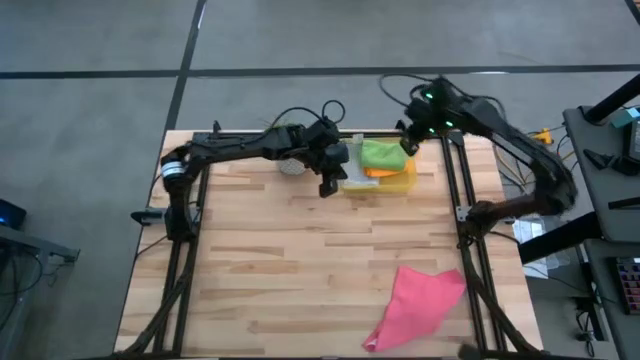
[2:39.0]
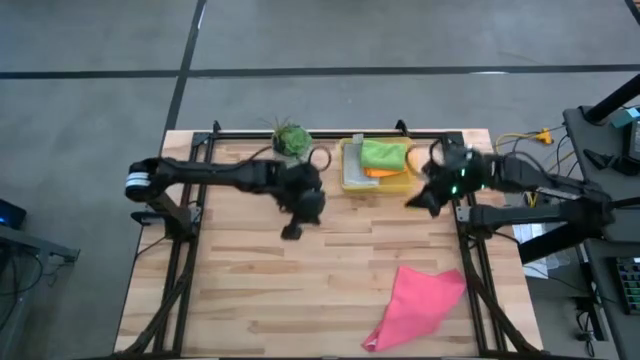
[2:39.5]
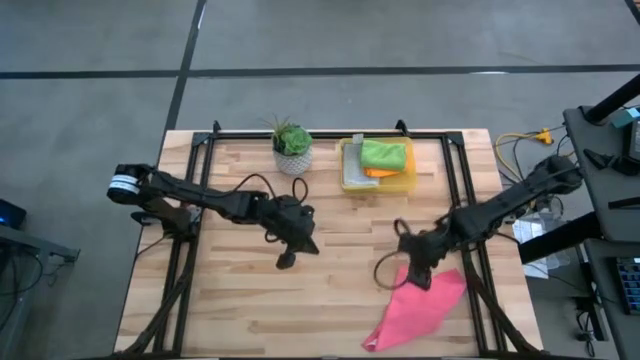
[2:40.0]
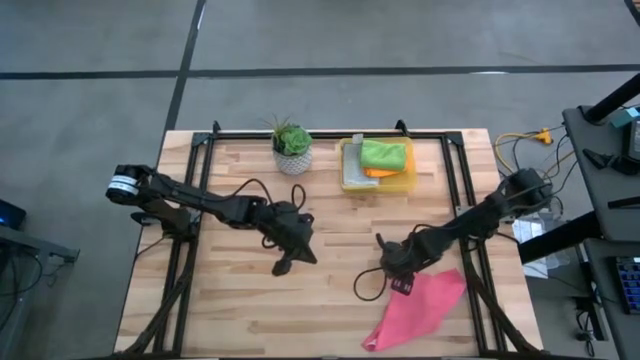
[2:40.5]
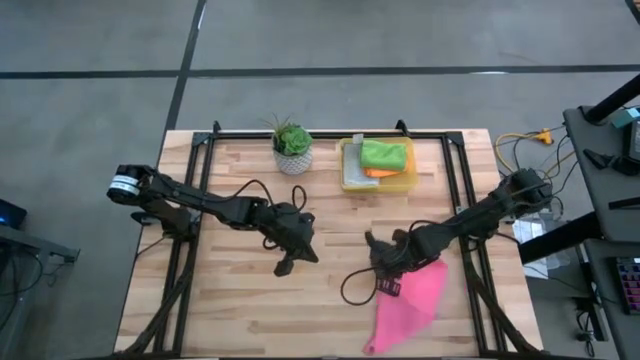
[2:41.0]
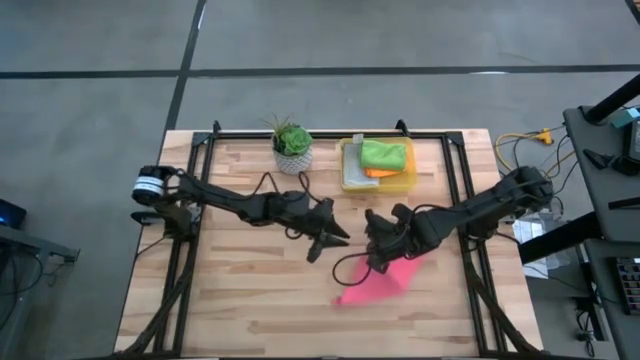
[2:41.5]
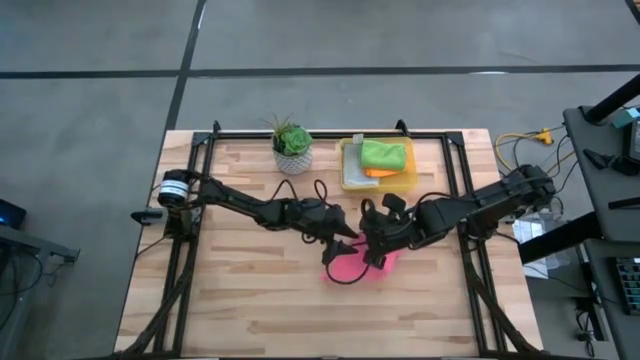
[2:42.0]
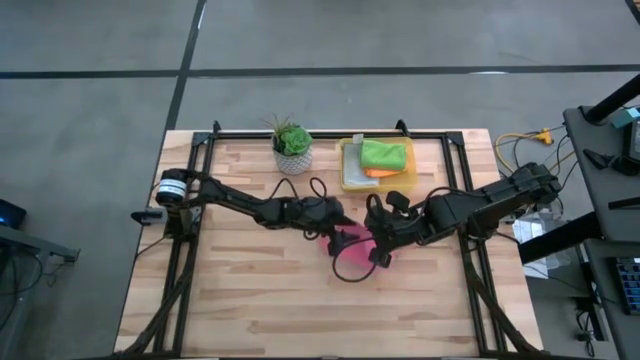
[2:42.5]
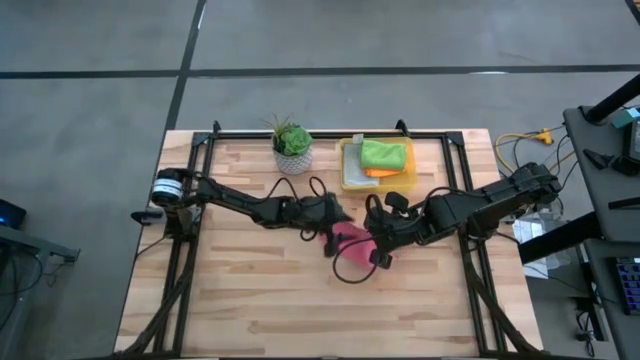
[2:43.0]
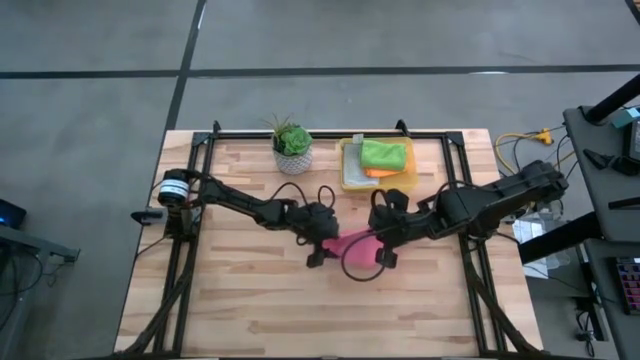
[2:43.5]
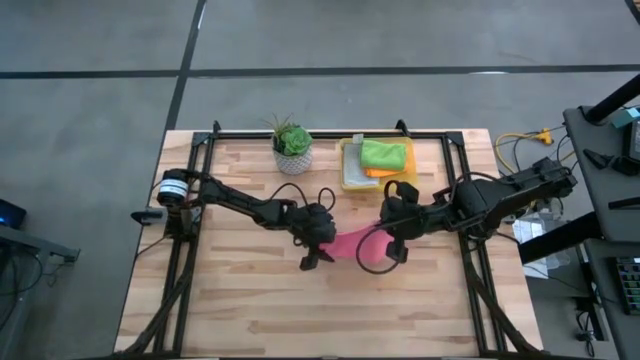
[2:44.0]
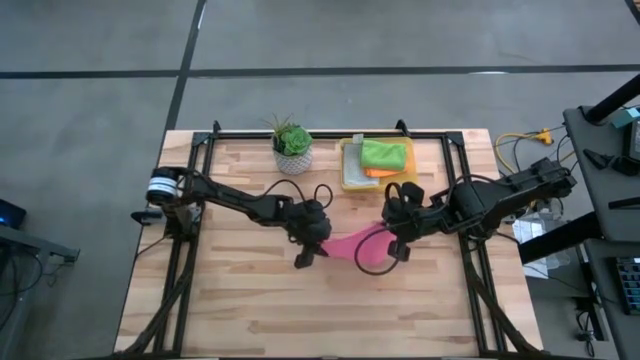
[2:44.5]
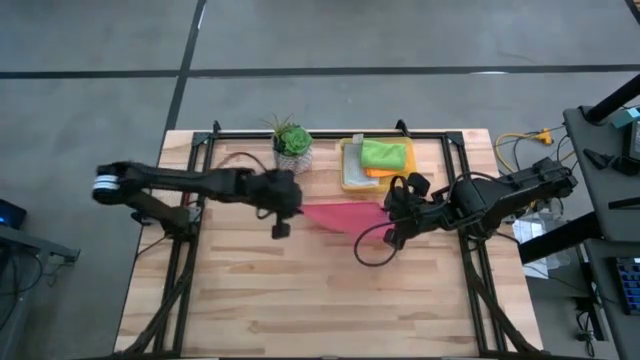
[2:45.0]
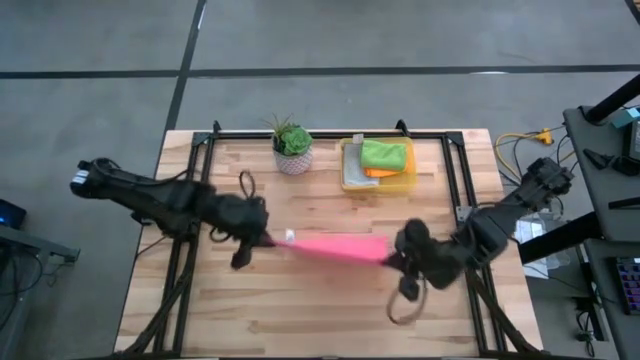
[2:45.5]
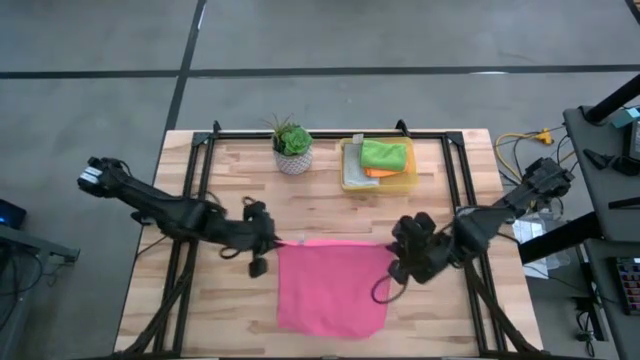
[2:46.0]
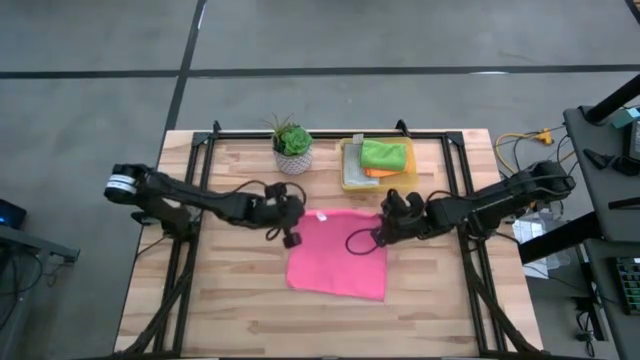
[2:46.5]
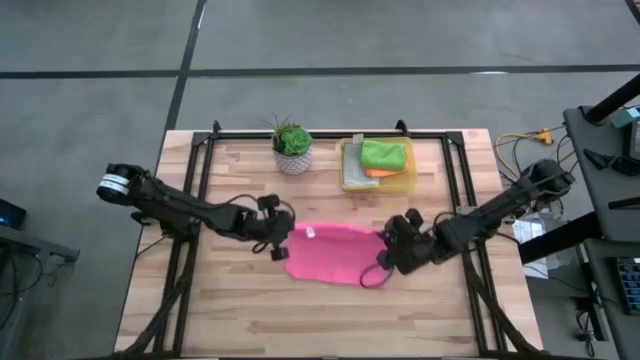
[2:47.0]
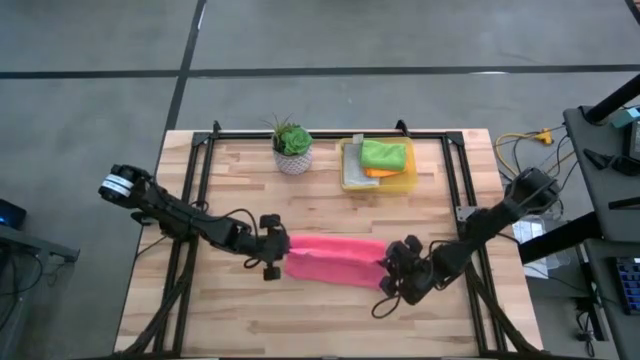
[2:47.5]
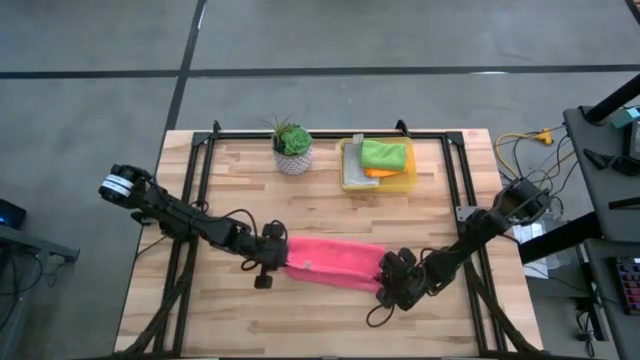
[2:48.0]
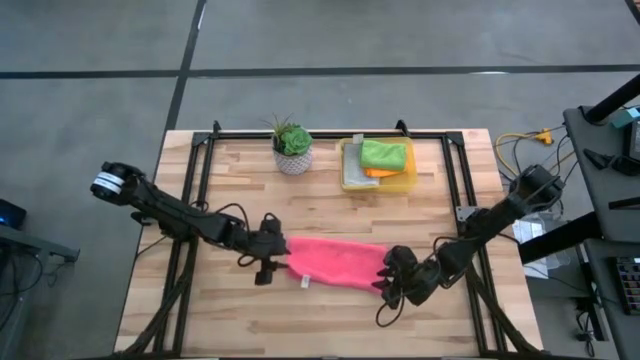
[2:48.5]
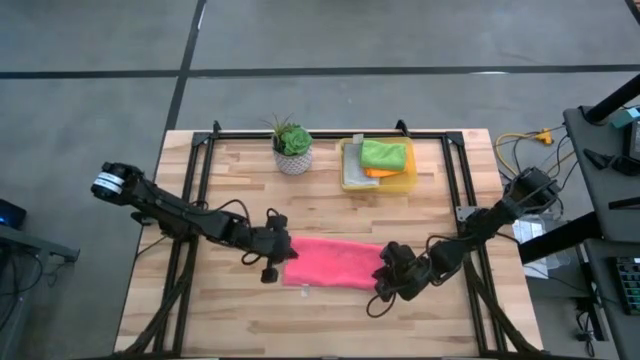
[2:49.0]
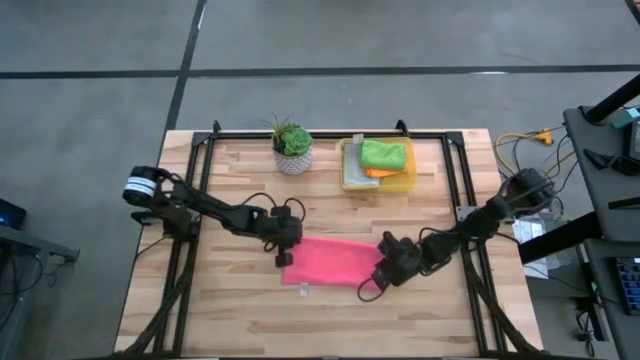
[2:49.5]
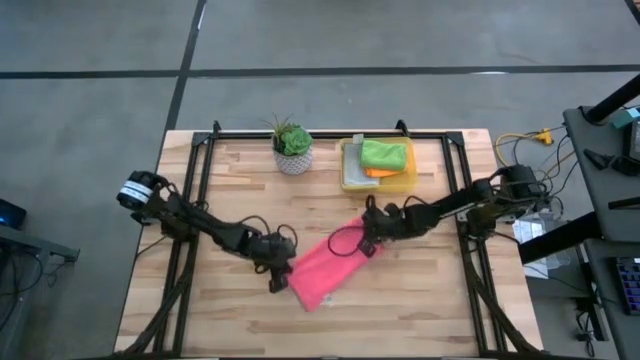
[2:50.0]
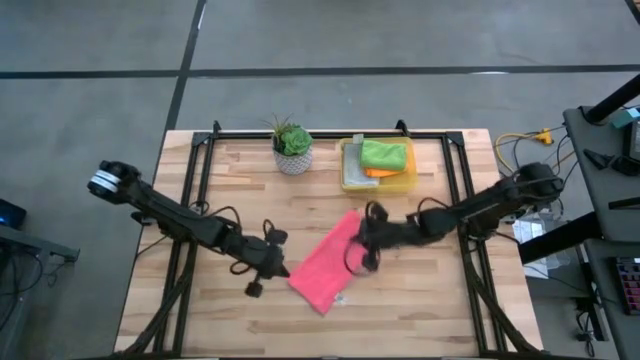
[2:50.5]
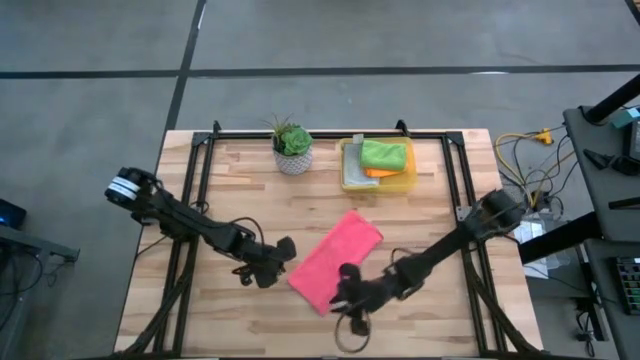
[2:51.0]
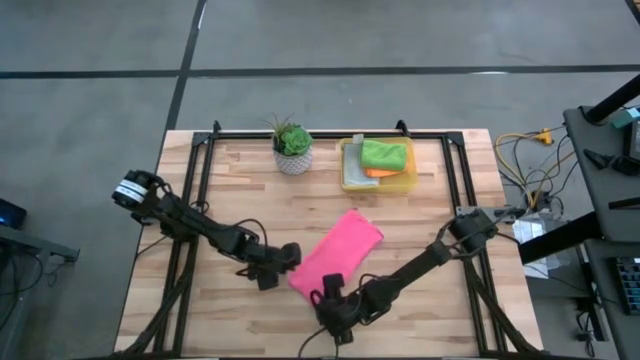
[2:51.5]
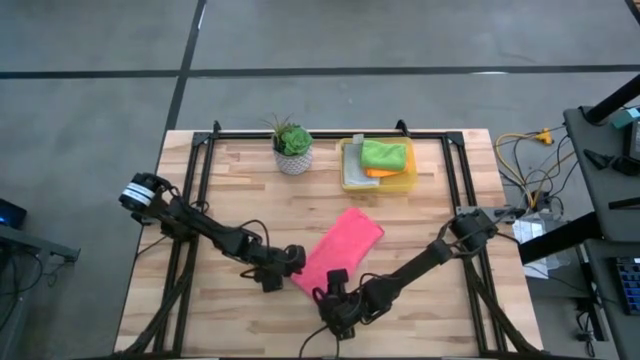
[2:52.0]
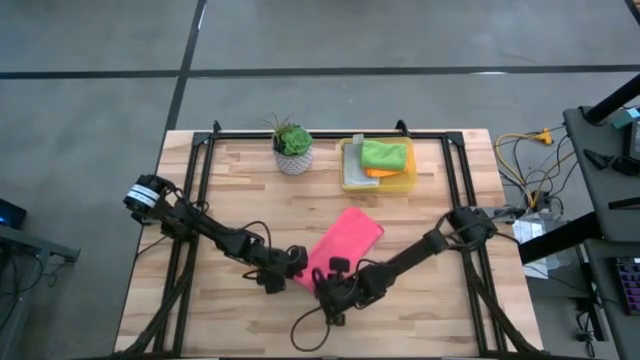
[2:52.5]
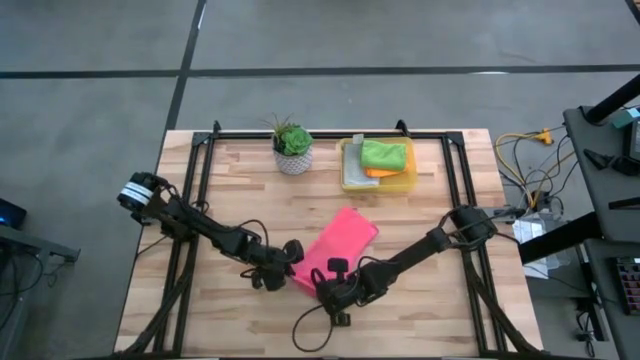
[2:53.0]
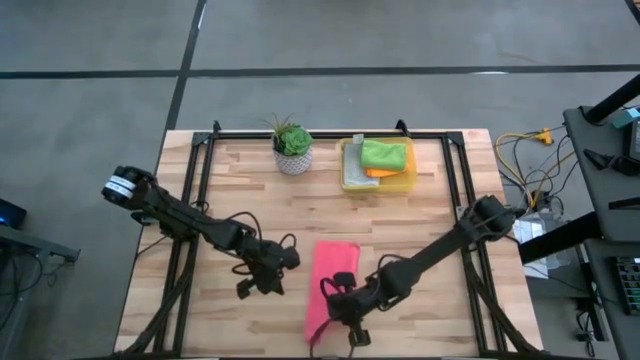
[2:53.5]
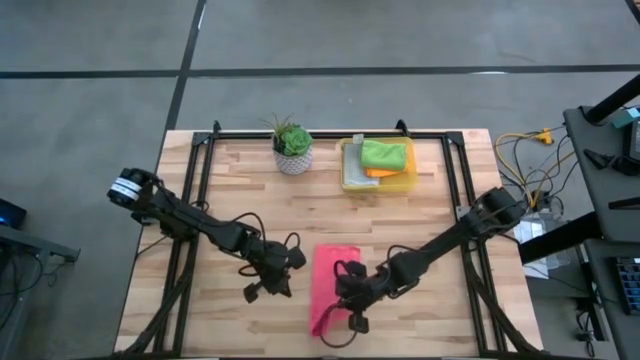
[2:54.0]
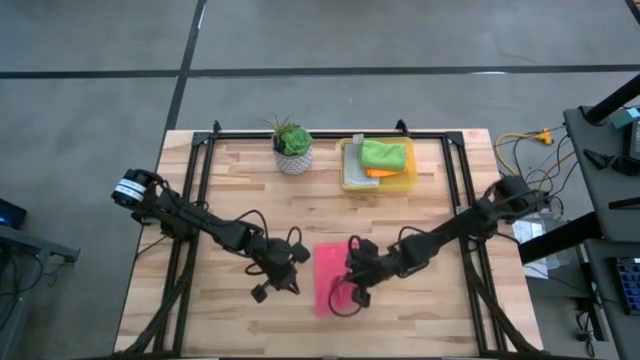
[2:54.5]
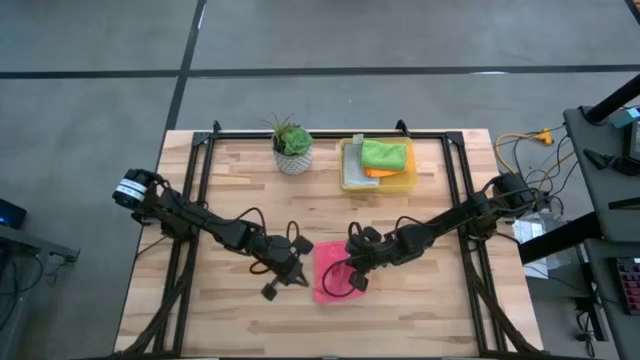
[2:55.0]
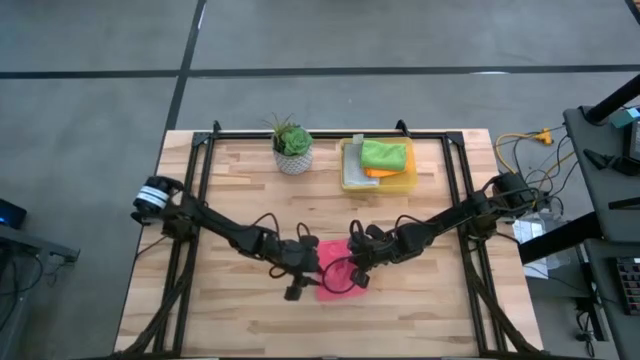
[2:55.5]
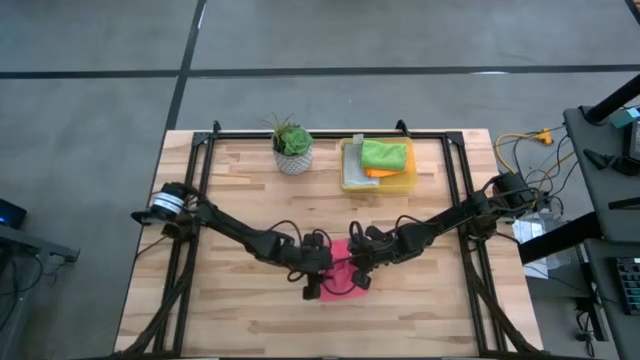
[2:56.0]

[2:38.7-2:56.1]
Task: Fold microfiber towels
Fold the pink microfiber cloth

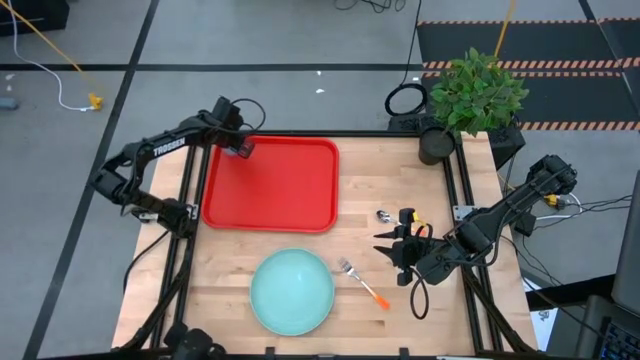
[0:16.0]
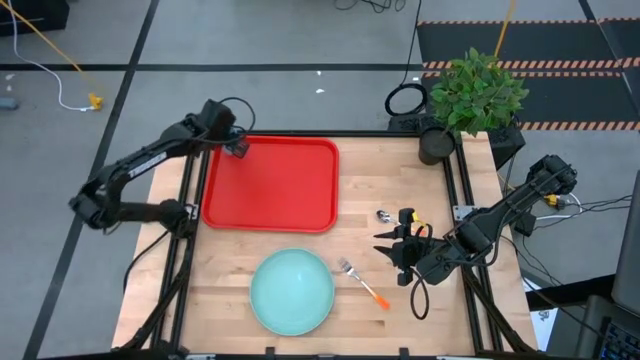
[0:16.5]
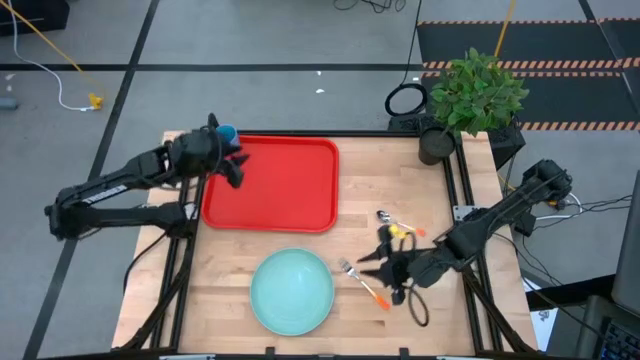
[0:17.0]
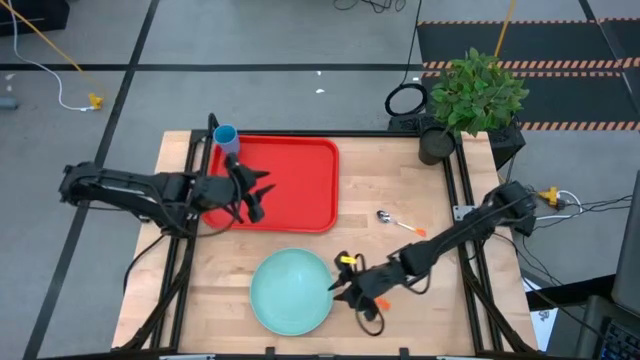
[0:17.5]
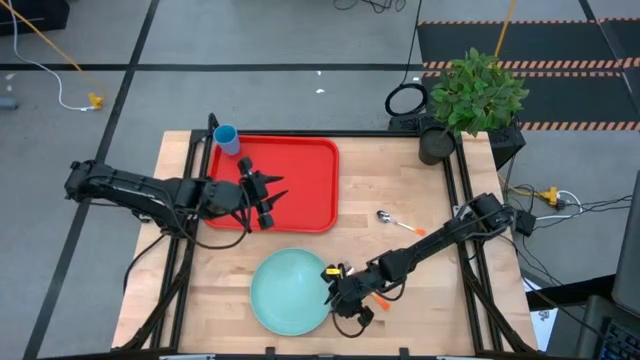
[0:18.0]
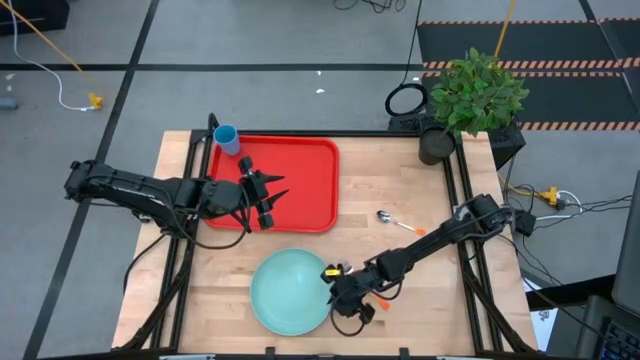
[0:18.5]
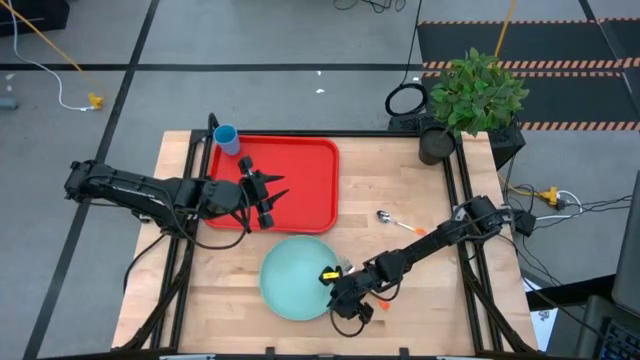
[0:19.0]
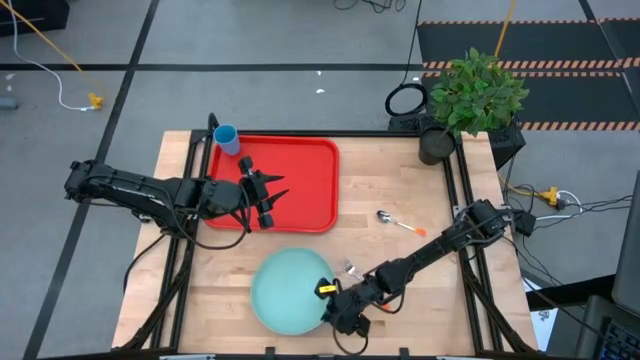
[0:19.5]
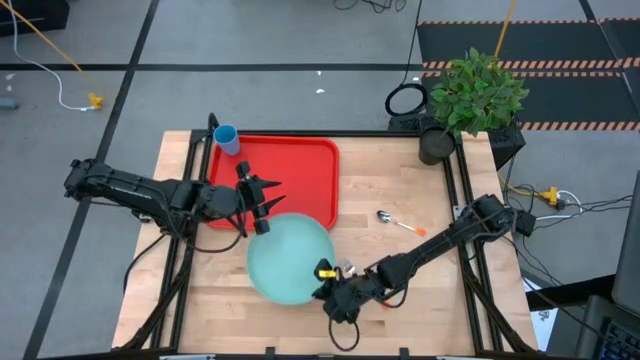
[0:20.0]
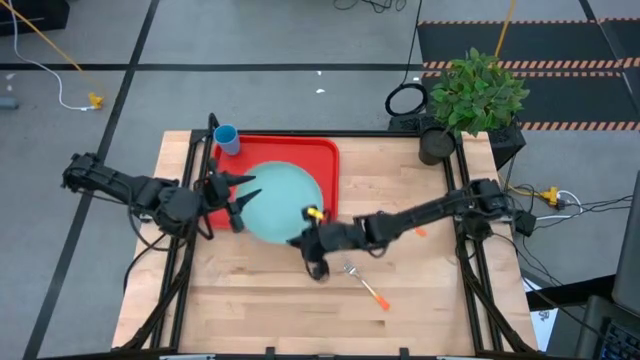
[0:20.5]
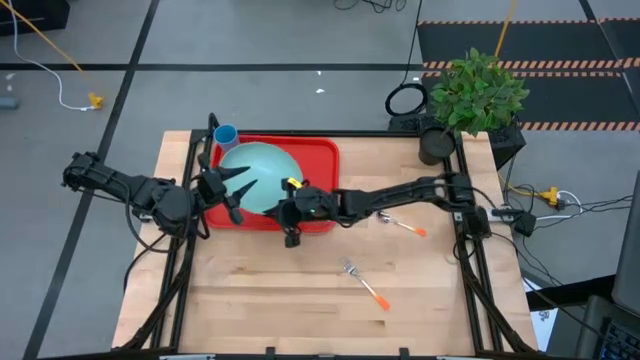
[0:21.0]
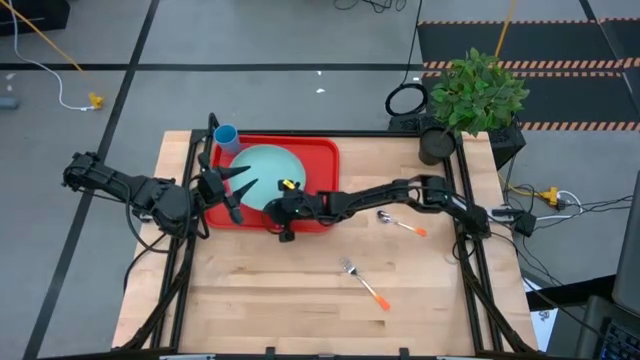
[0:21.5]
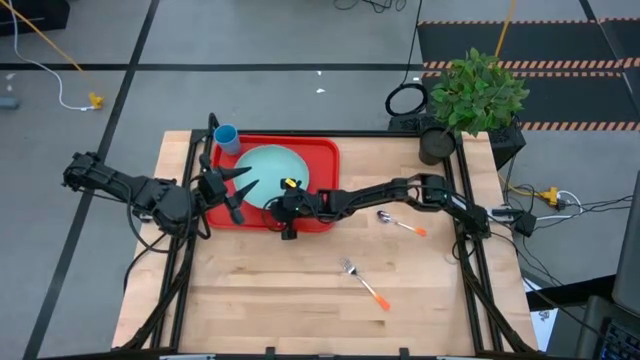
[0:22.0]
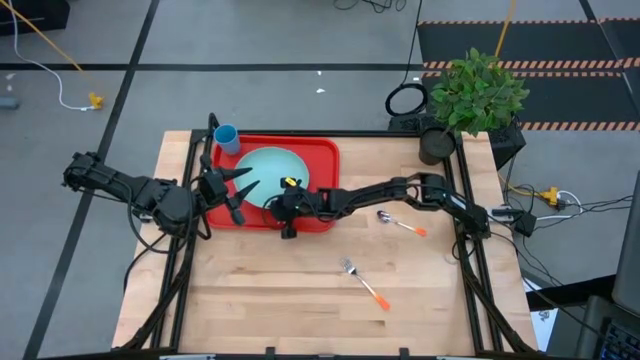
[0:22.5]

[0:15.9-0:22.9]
Task: Pick and place plate/cup/fork/spoon on tray
Put the green plate on the red serving tray
